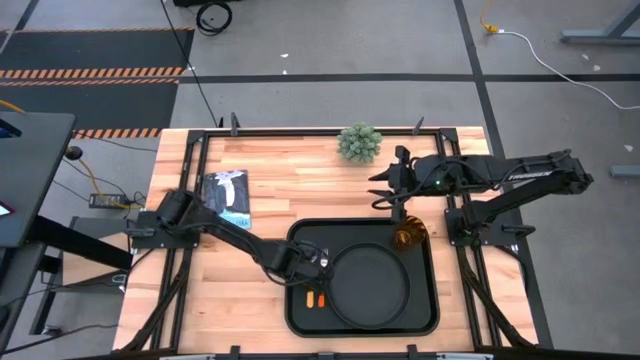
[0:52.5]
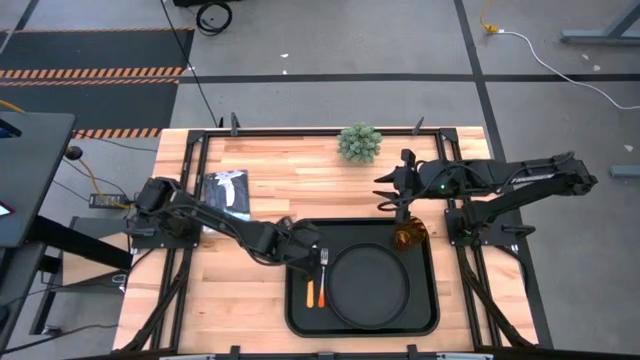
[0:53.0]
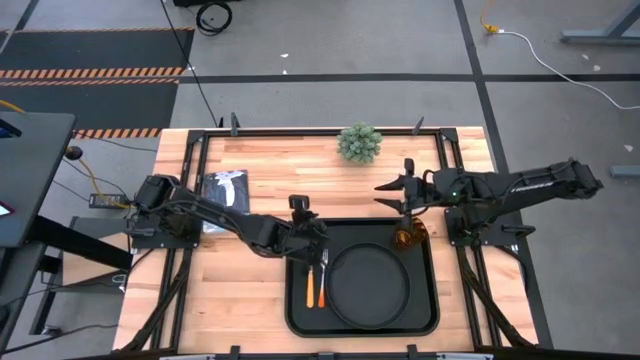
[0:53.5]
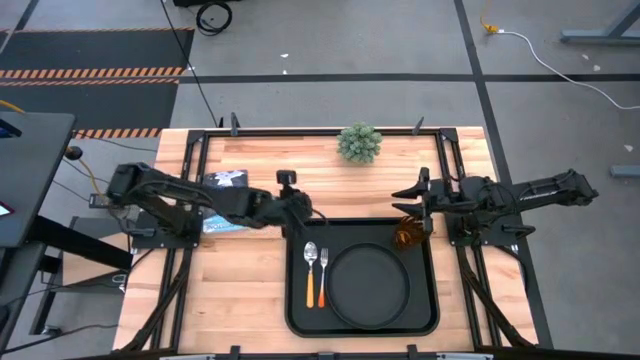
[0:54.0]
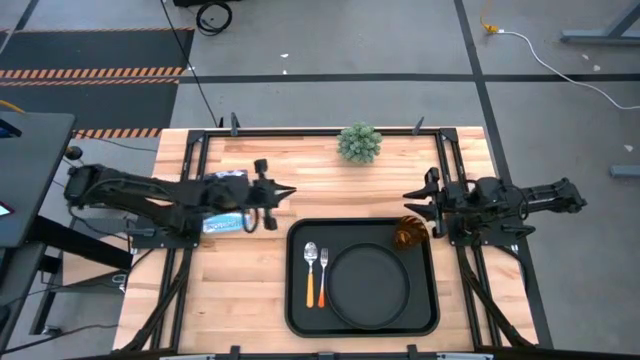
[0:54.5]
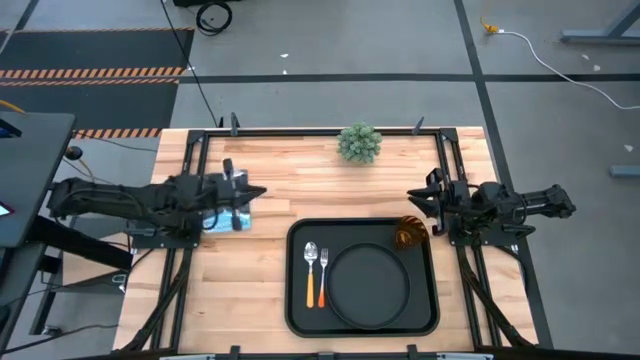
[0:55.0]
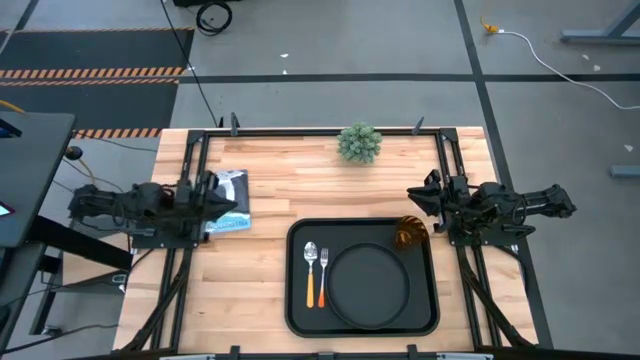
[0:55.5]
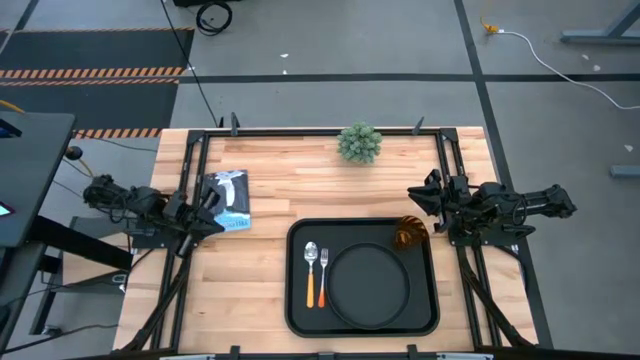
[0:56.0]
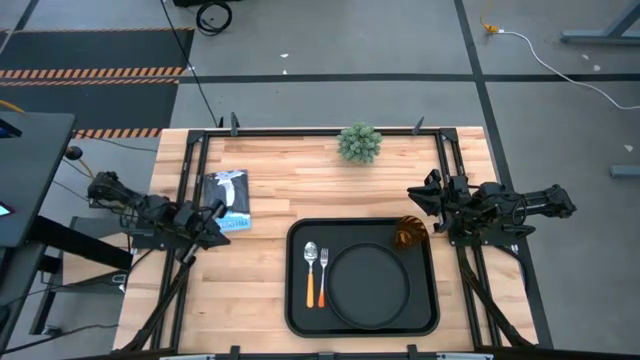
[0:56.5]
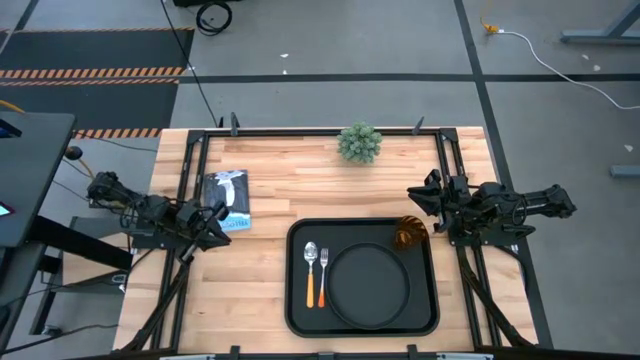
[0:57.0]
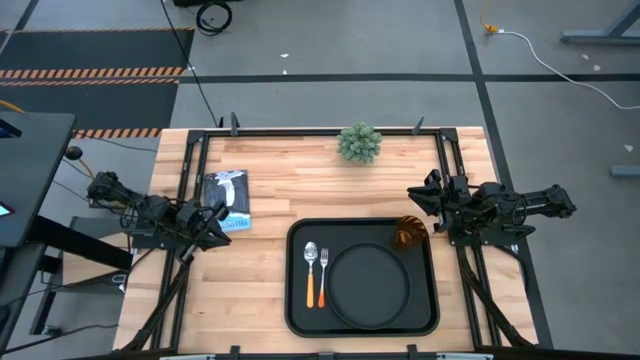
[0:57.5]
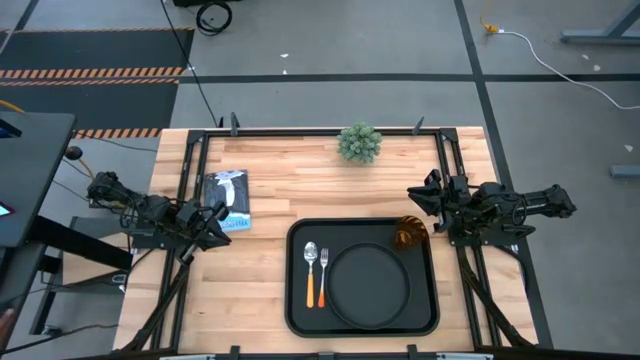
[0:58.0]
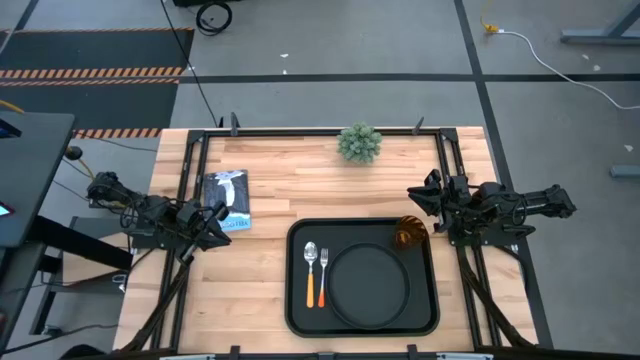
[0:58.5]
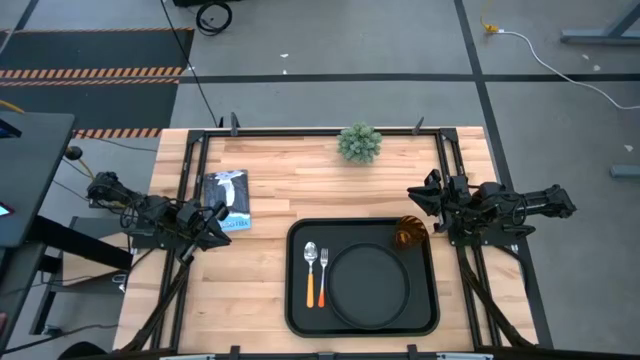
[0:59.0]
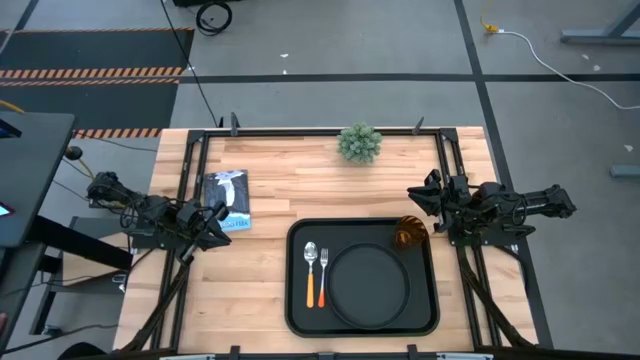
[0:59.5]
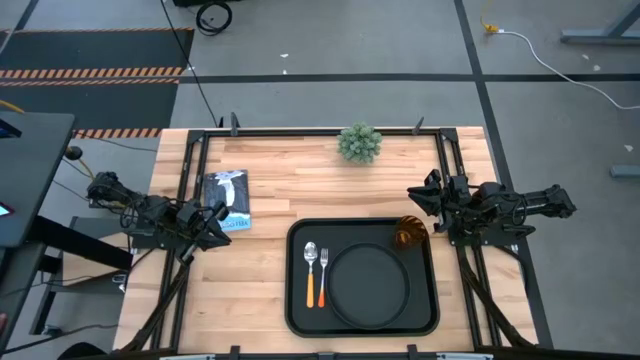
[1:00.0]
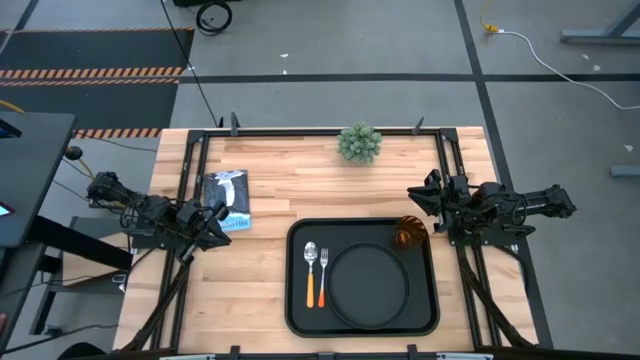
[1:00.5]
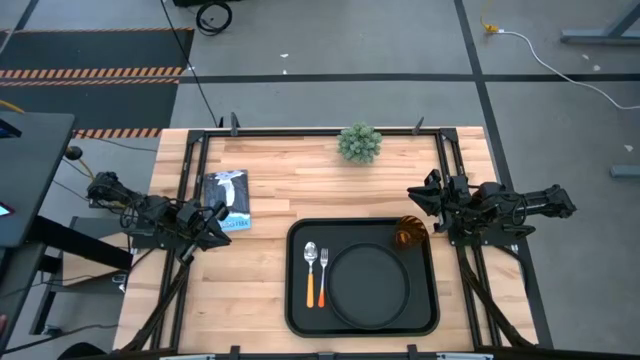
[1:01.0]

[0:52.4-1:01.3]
Task: Pick and place plate/cup/fork/spoon on tray
Return to Home Position

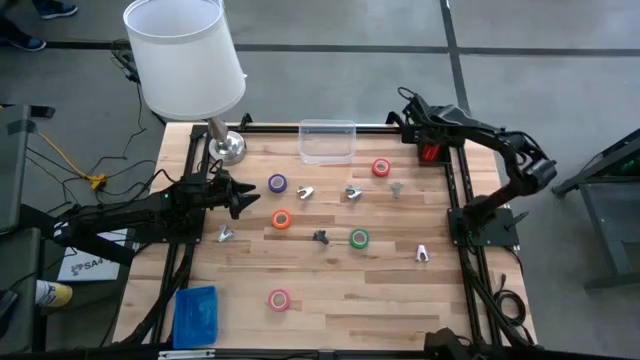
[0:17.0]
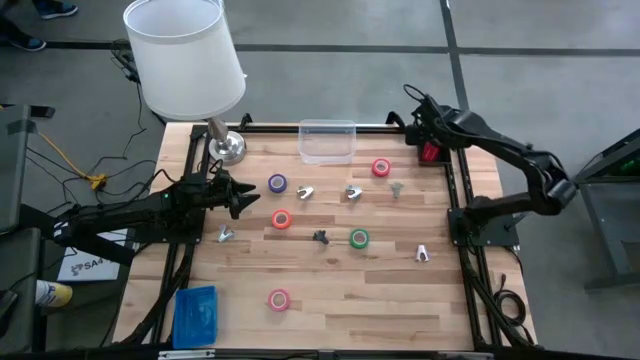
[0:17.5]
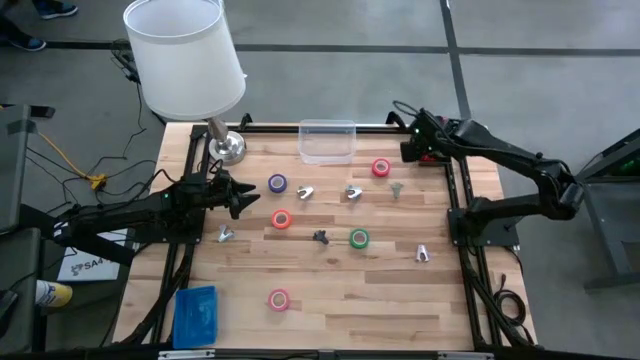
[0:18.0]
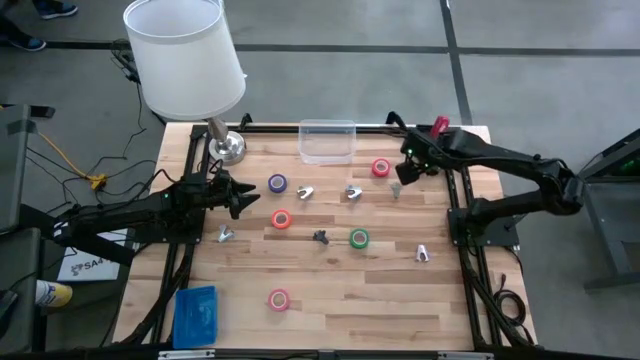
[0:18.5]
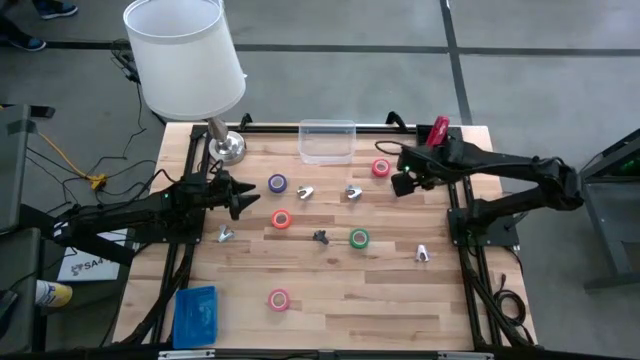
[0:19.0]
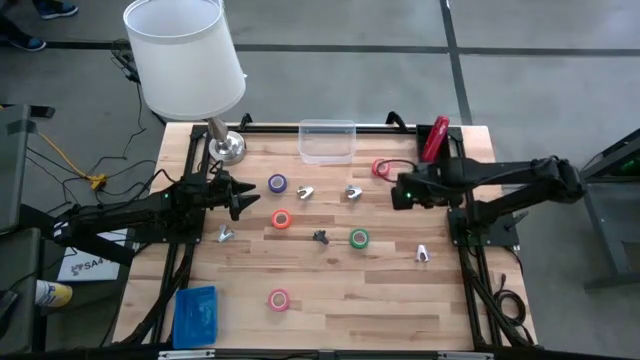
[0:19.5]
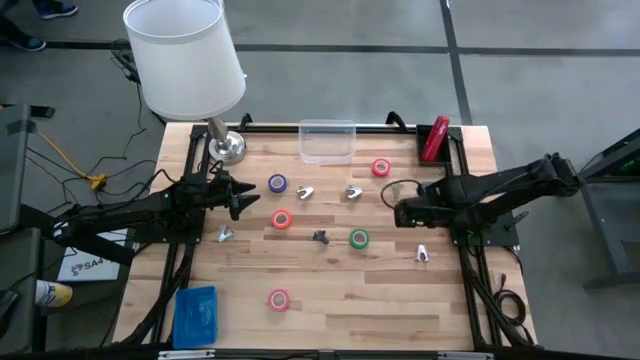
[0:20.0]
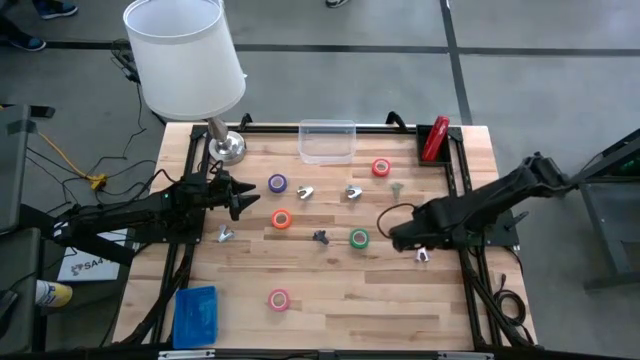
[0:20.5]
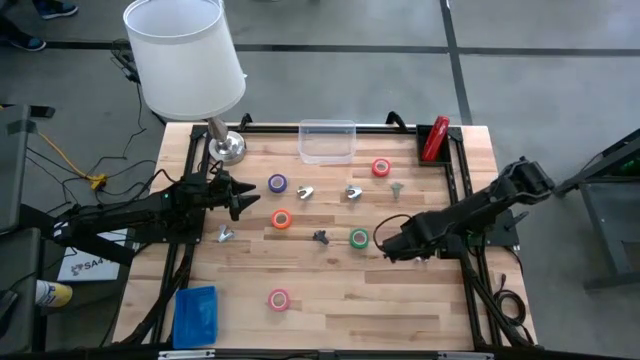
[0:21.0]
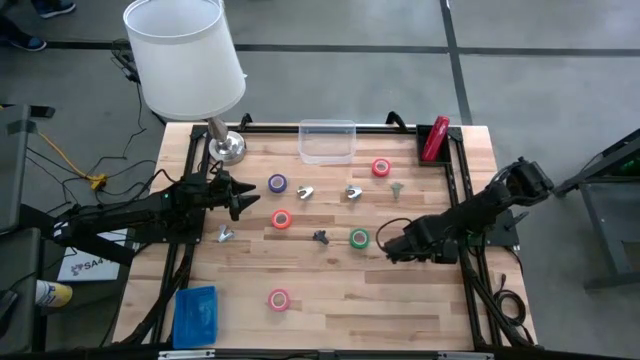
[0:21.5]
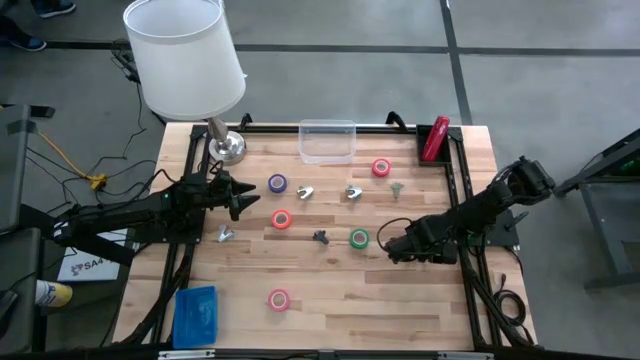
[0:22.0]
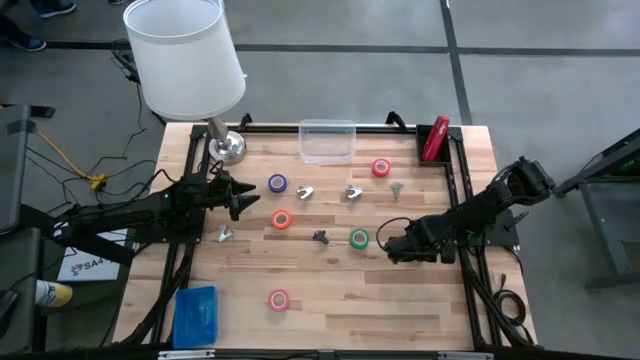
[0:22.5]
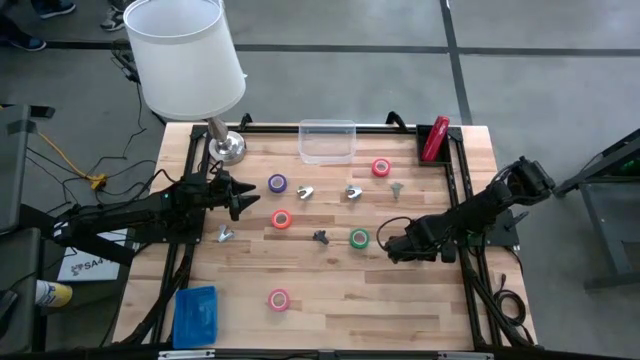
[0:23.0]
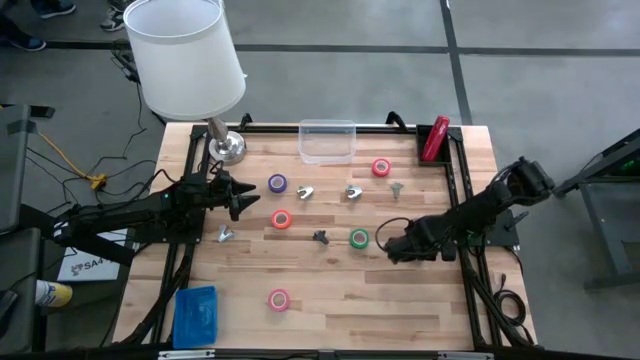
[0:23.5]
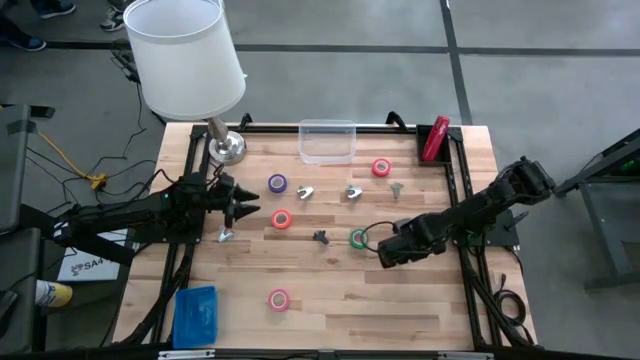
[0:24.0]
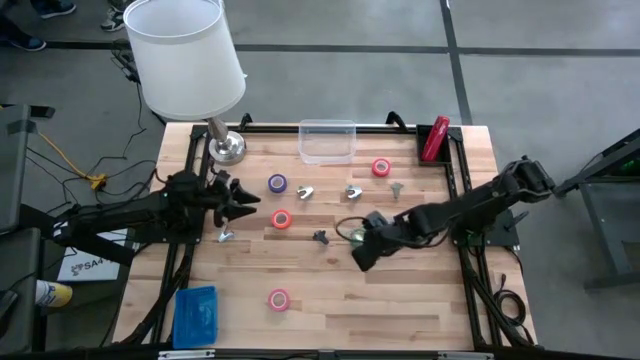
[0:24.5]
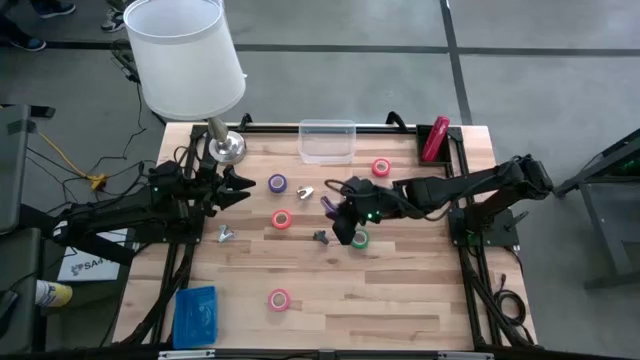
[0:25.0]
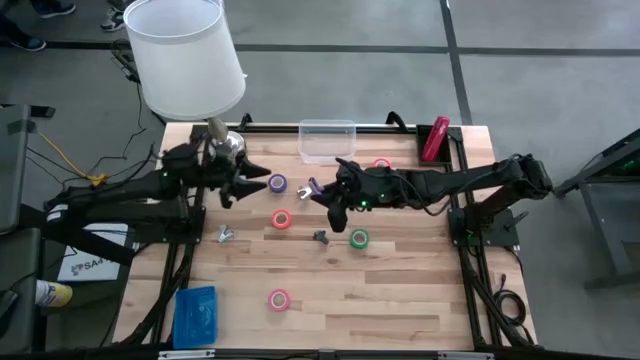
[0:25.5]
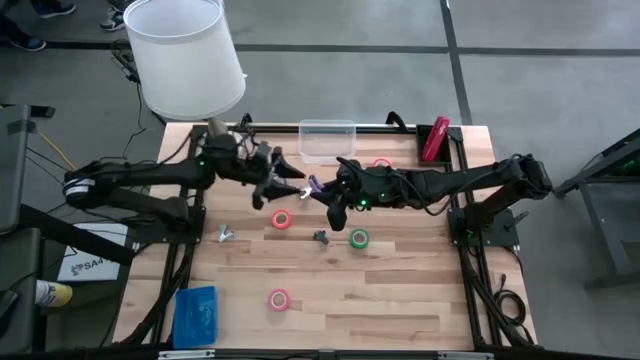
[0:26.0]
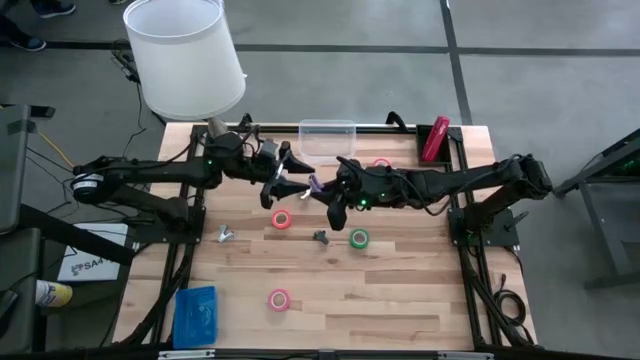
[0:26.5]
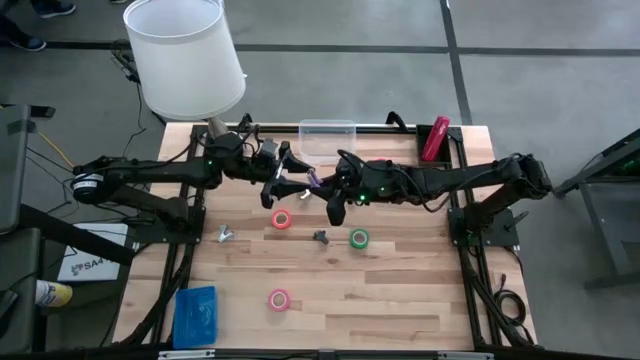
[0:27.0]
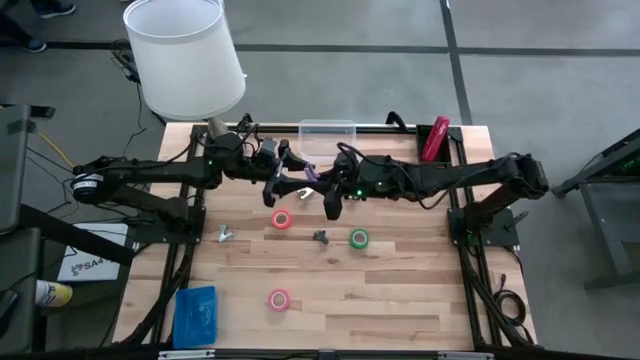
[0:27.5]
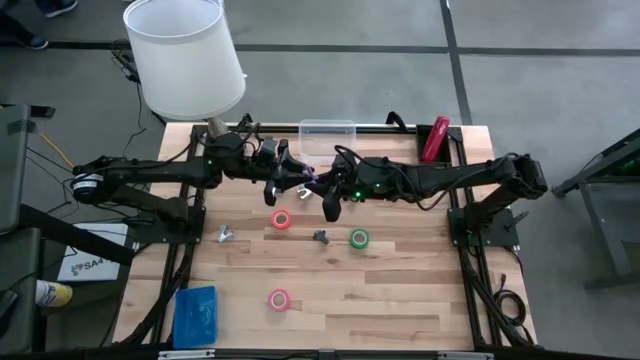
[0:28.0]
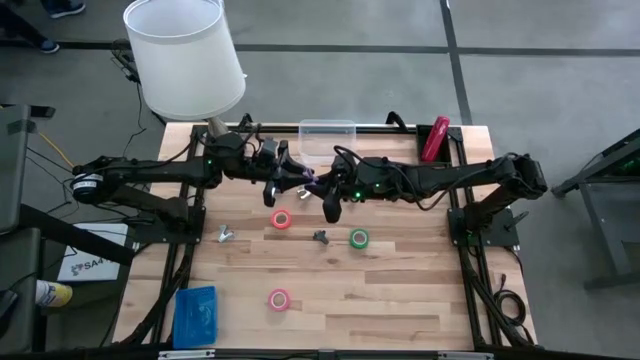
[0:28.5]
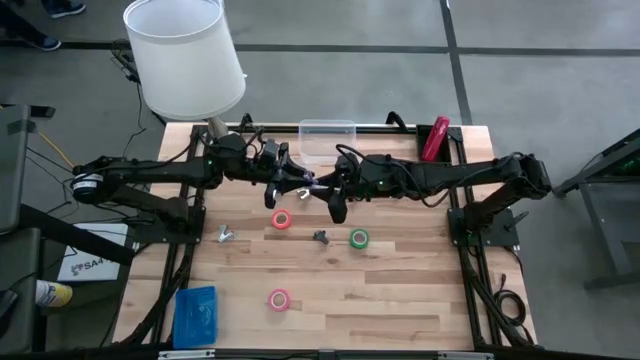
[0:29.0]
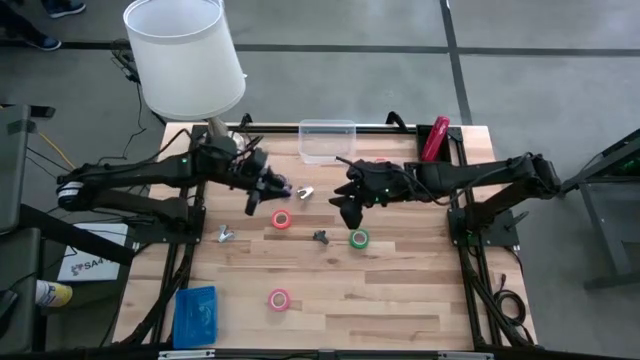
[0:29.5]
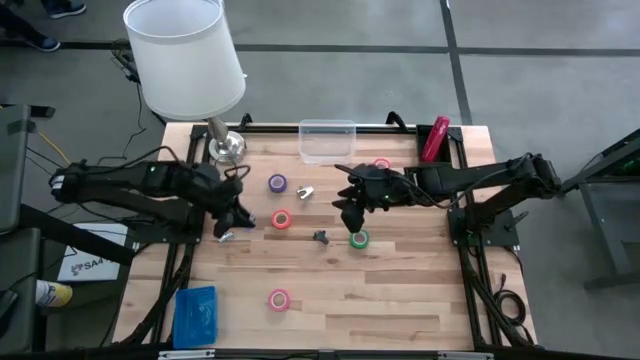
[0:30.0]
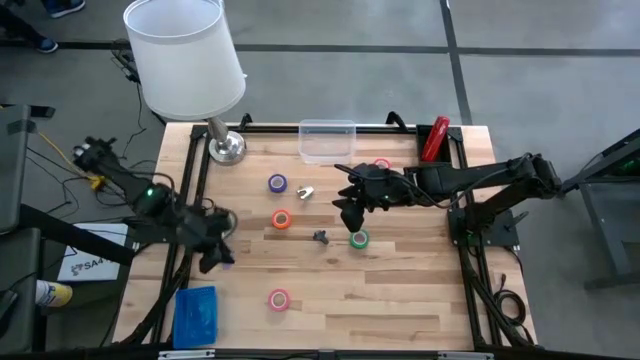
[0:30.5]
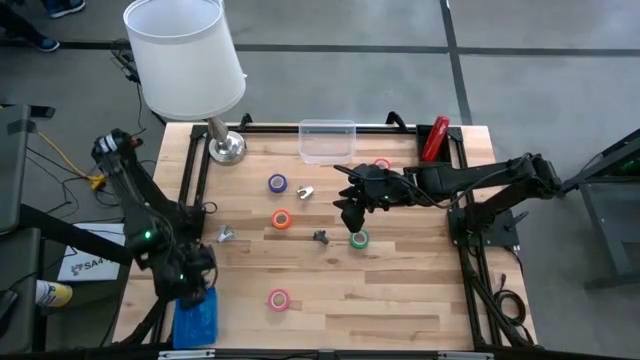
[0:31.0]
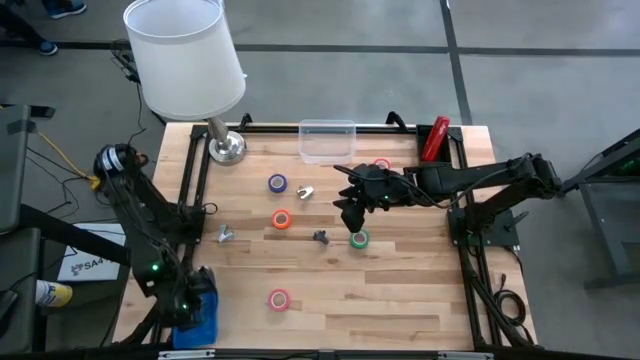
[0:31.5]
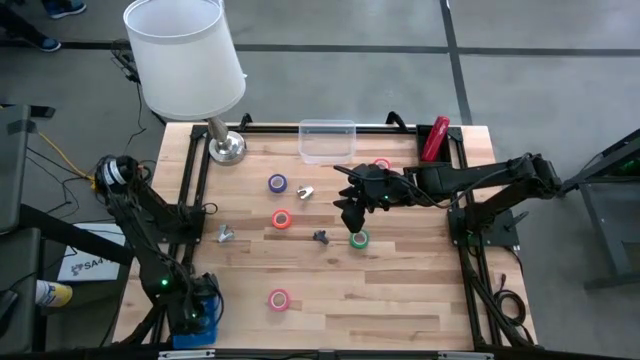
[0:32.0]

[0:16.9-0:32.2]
Task: Pick and place Stapler, Stapler remover, tape
Put the purple staple remover into the blue bin
